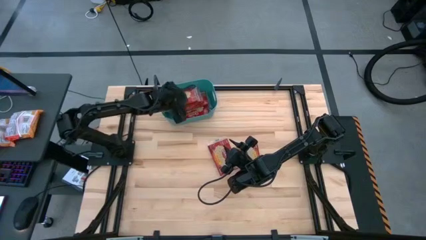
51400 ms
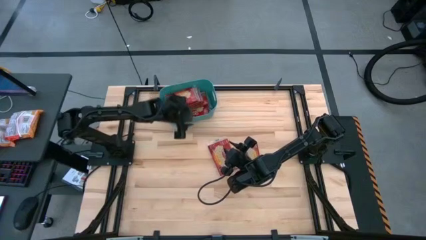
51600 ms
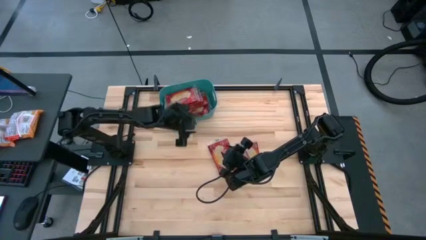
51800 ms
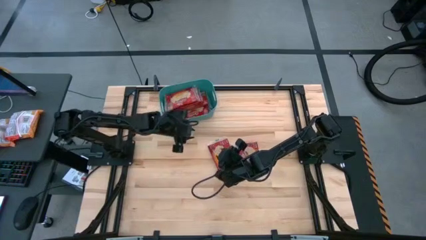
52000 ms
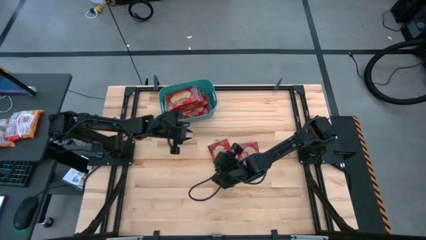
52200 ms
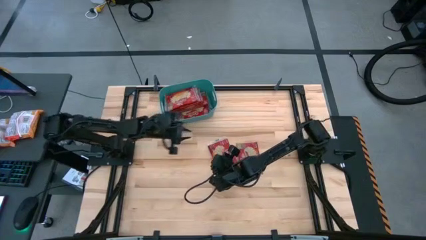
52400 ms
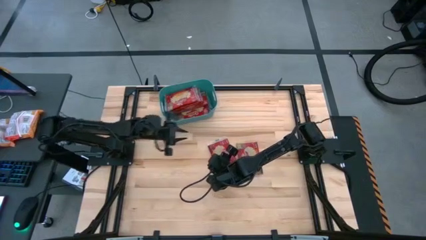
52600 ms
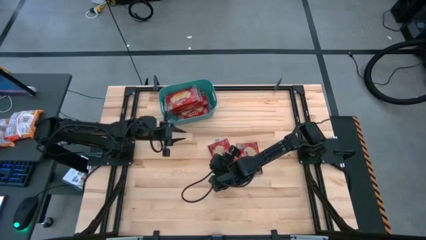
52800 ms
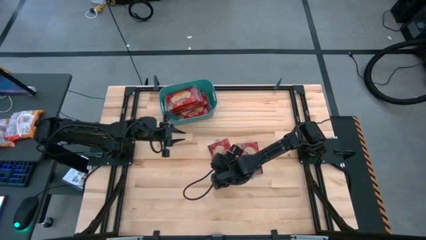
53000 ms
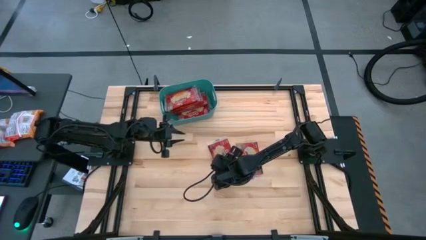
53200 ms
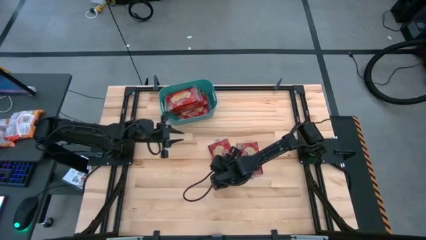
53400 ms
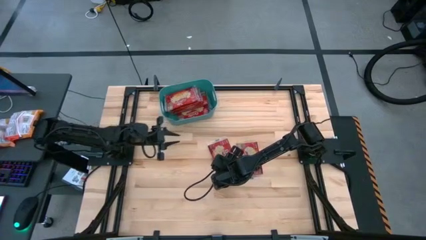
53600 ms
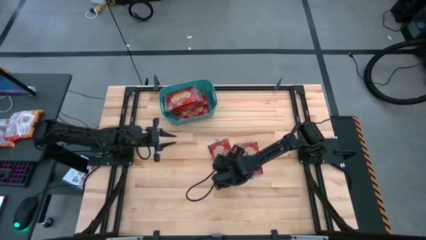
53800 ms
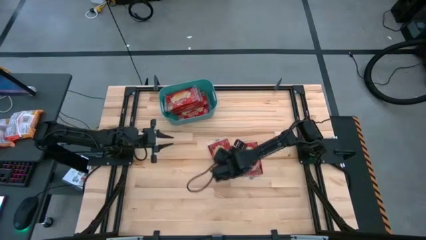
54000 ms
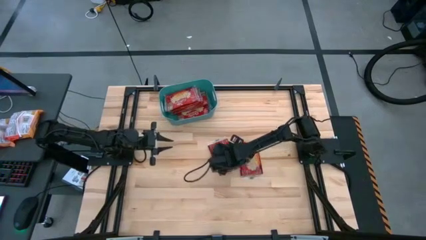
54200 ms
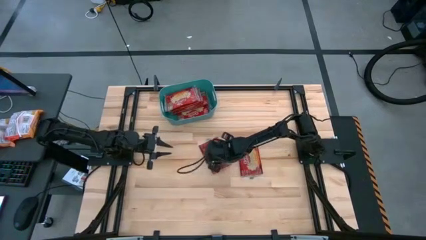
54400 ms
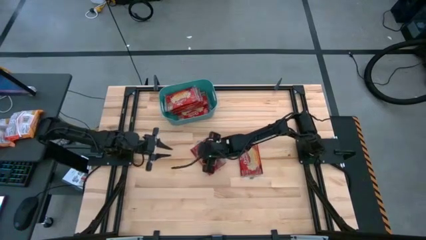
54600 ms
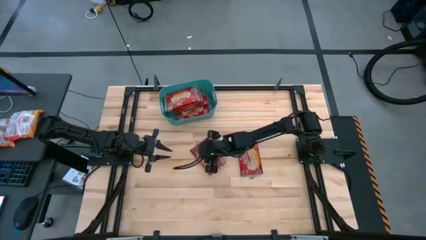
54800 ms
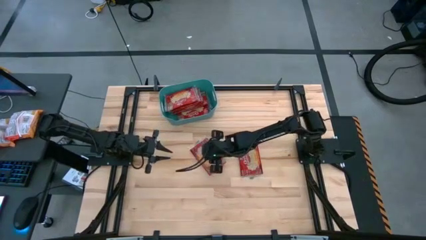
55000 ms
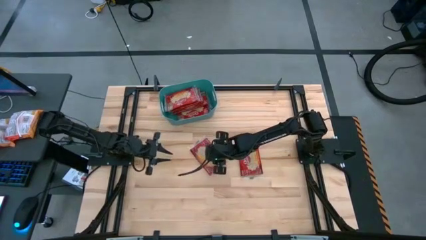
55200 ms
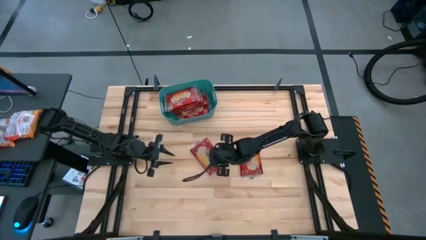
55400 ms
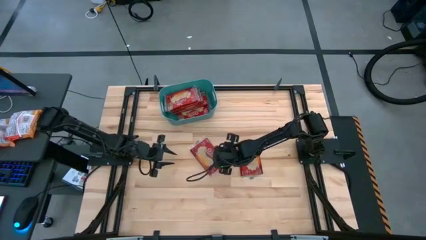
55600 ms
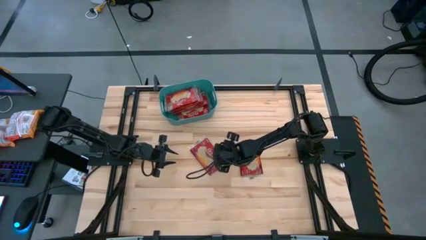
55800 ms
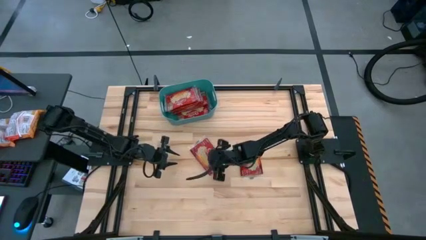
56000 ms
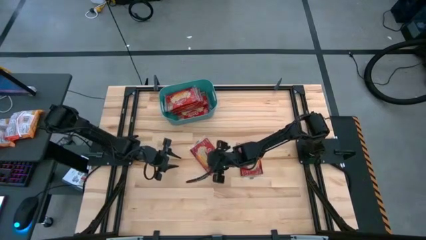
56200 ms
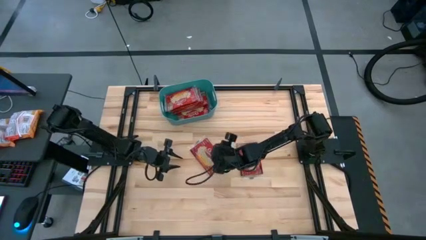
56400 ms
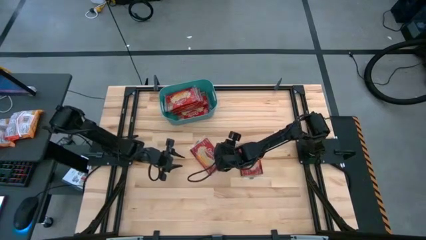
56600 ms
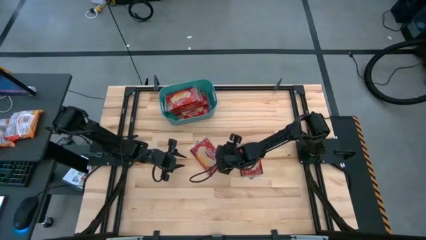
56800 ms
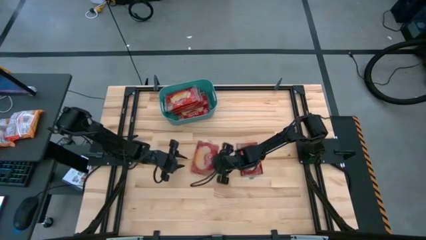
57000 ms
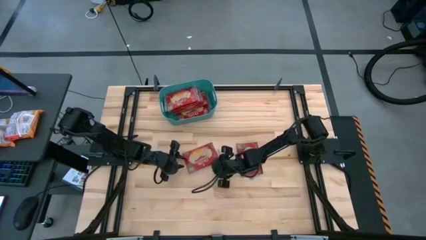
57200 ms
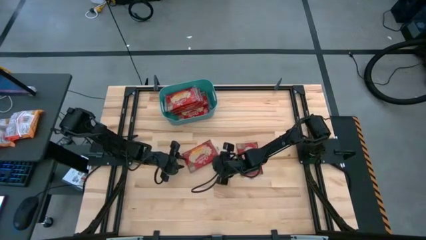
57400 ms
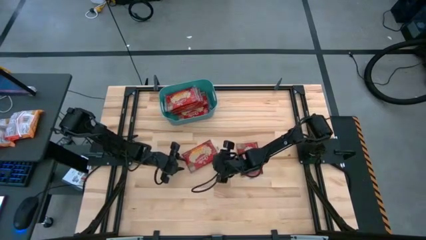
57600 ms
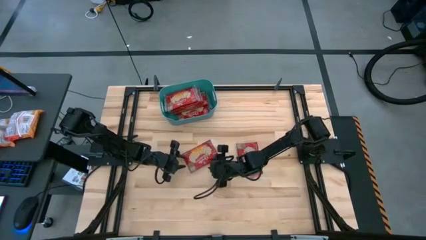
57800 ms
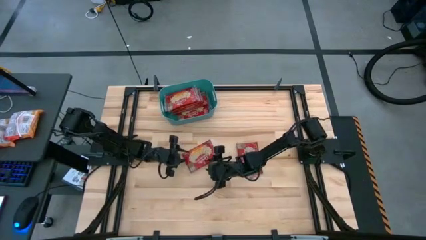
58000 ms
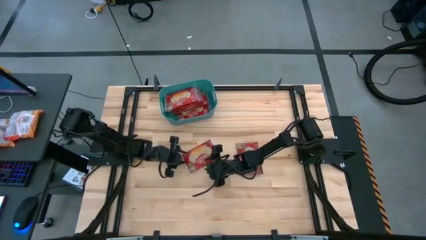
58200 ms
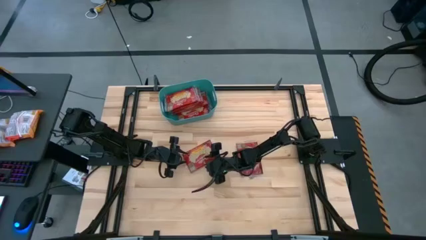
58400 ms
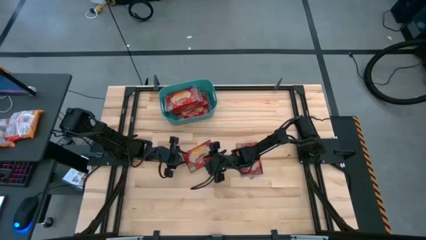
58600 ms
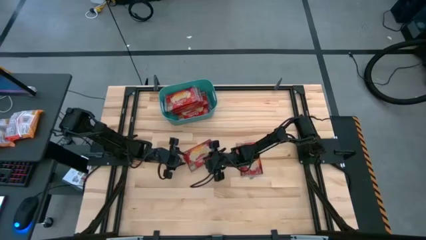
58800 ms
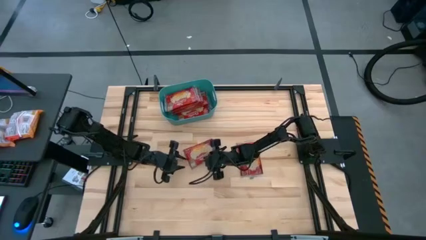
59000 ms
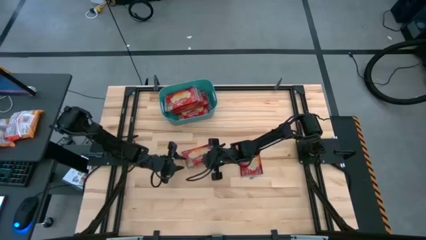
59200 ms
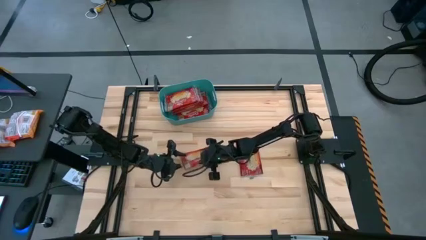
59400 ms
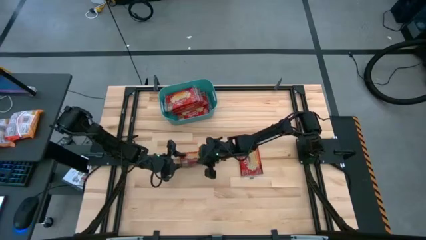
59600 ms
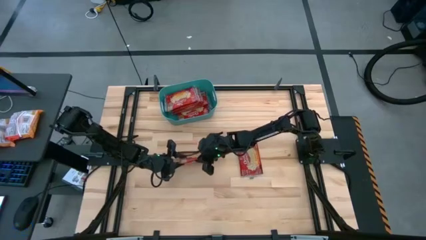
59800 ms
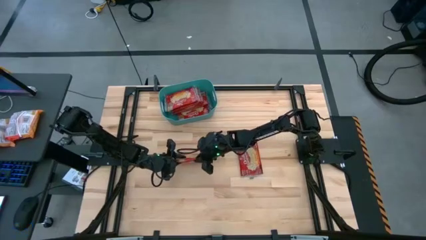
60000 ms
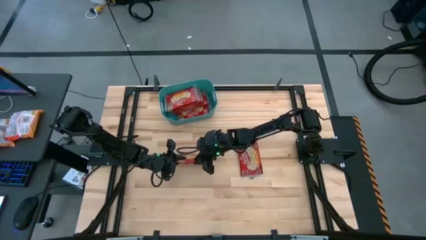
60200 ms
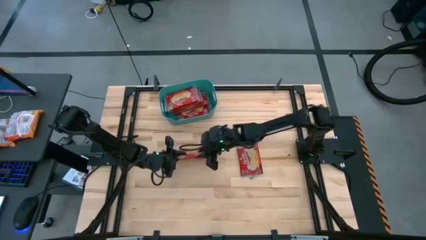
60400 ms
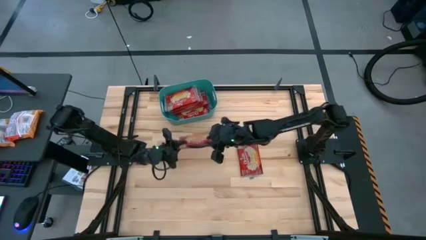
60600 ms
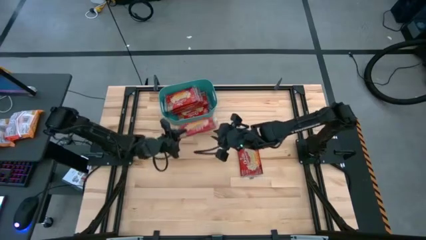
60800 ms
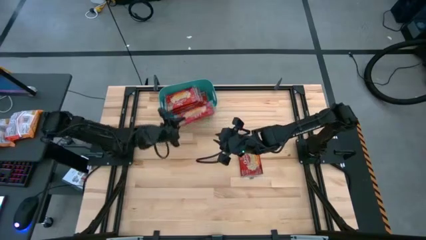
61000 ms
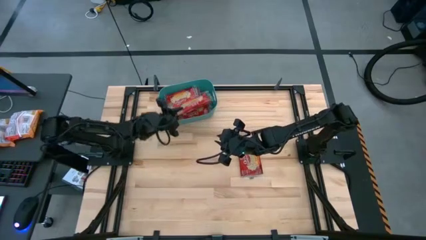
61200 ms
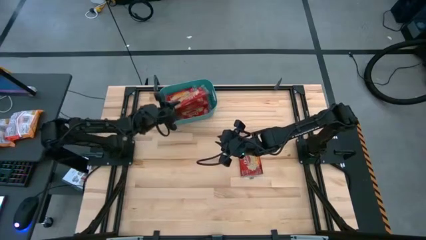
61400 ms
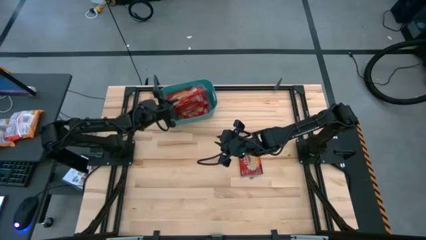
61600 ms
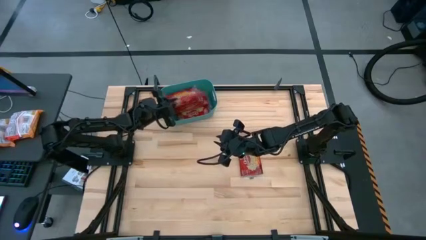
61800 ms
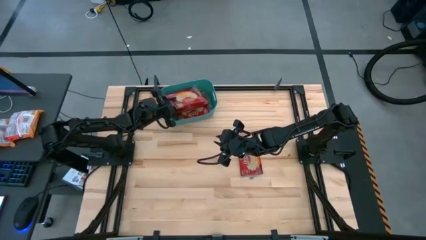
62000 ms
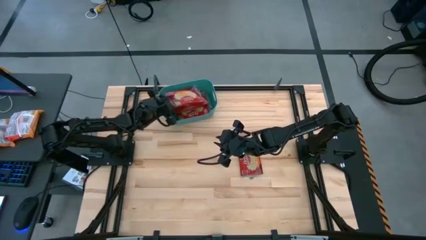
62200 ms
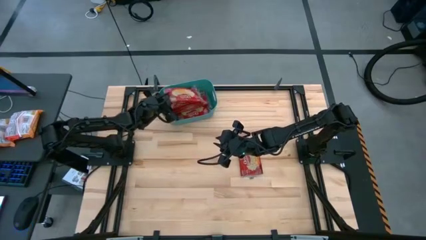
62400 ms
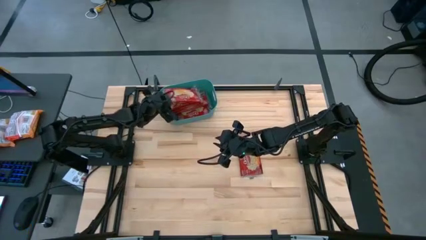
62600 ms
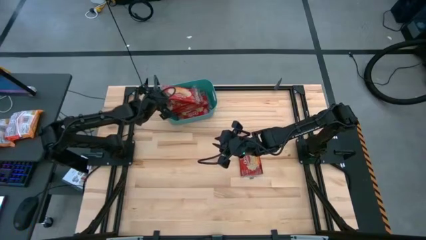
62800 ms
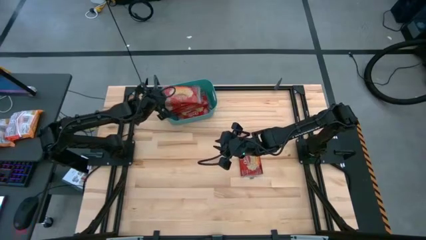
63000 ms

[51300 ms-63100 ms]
Task: Sort popcorn bags into baskets
Put the red popcorn bag into the blue container

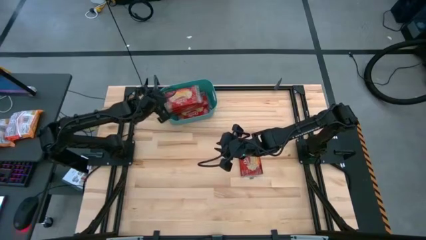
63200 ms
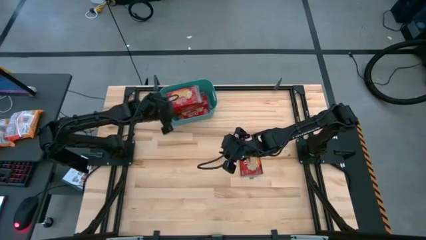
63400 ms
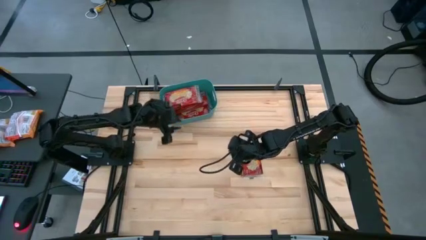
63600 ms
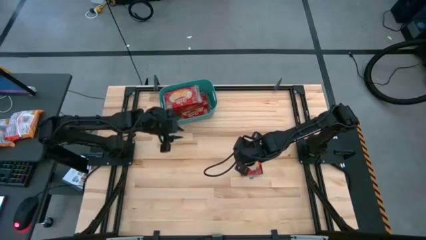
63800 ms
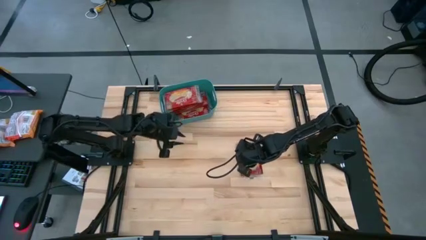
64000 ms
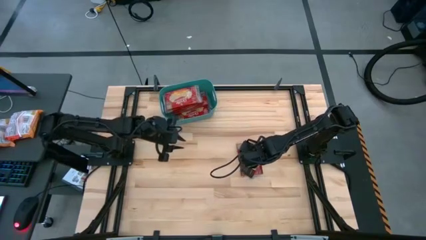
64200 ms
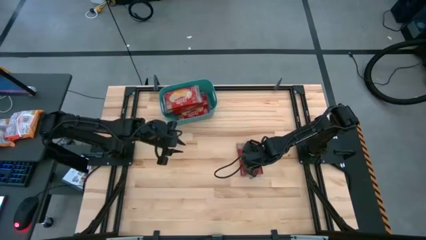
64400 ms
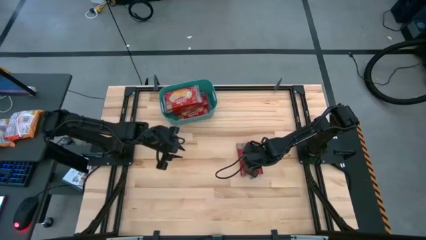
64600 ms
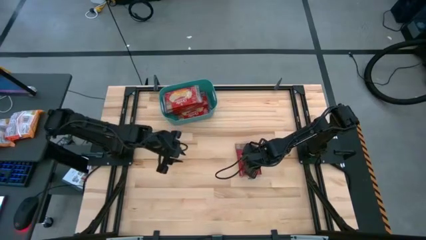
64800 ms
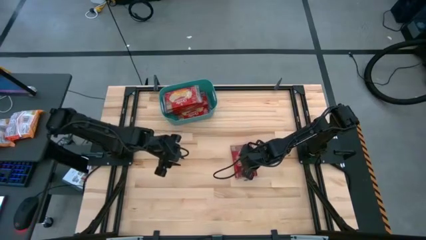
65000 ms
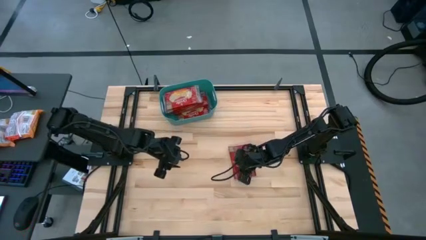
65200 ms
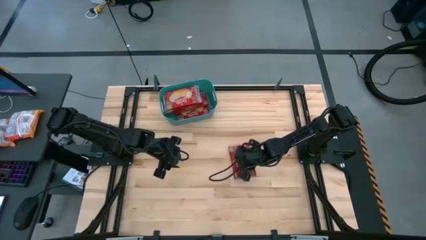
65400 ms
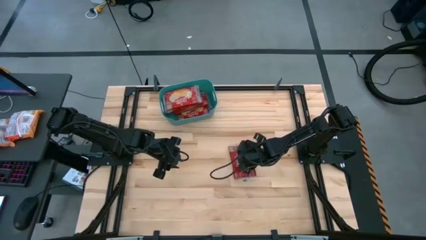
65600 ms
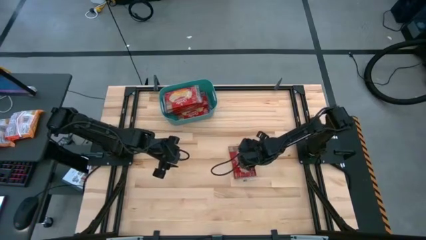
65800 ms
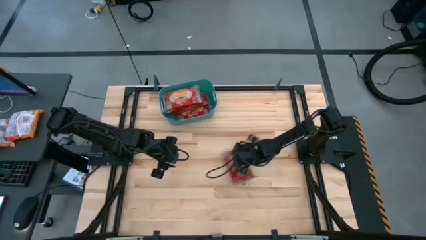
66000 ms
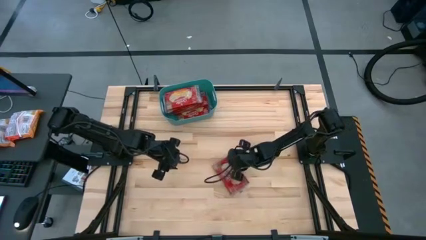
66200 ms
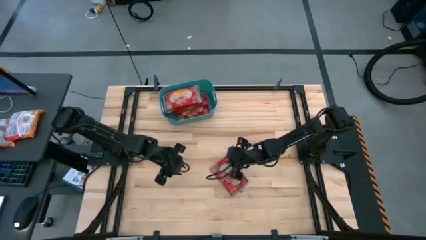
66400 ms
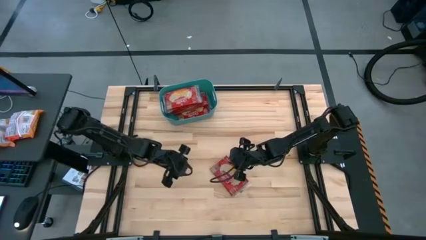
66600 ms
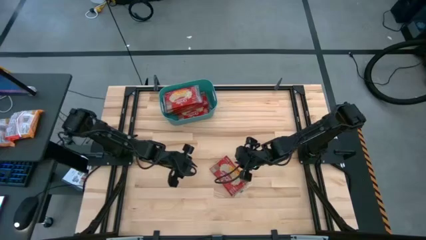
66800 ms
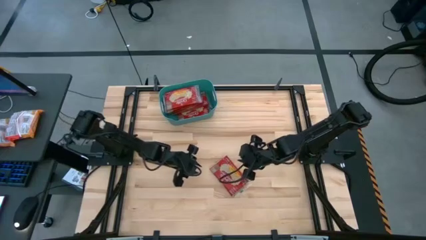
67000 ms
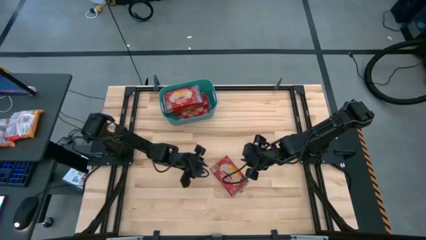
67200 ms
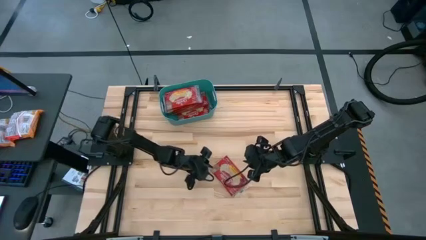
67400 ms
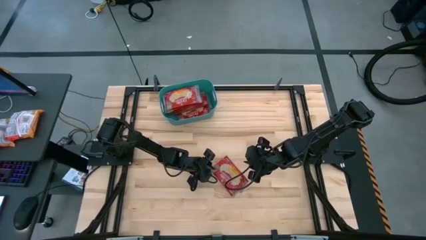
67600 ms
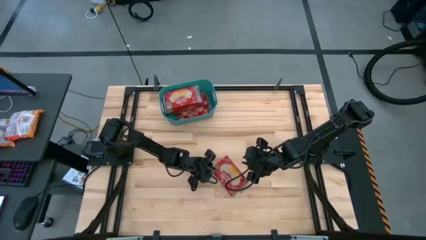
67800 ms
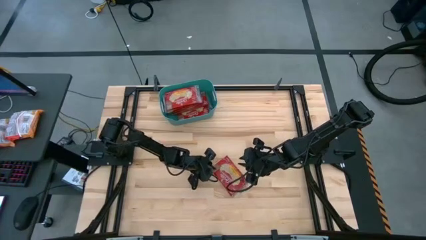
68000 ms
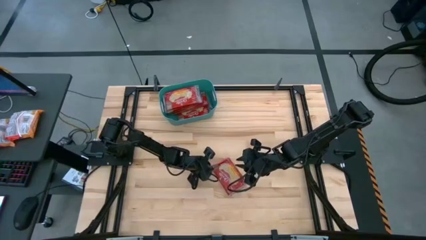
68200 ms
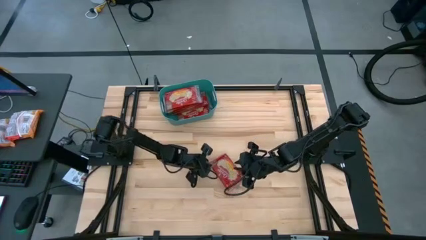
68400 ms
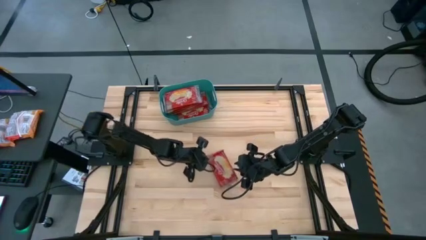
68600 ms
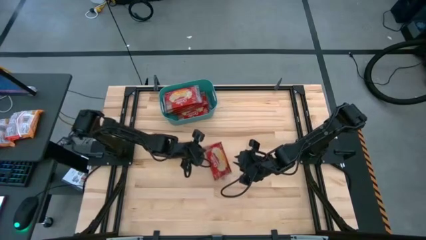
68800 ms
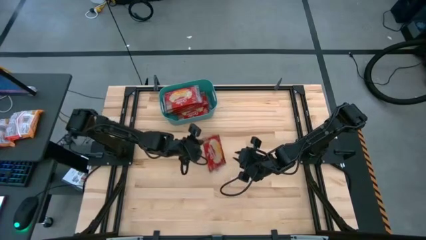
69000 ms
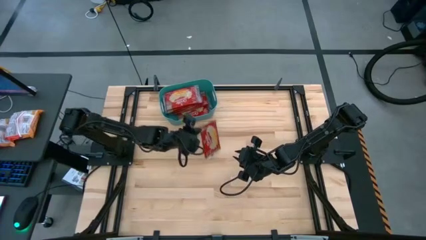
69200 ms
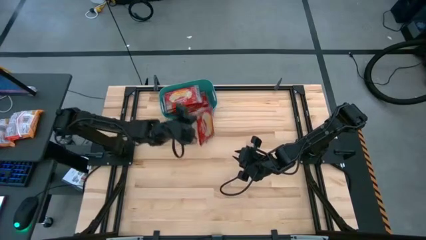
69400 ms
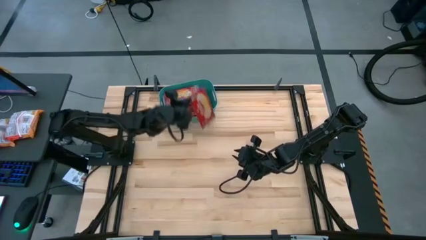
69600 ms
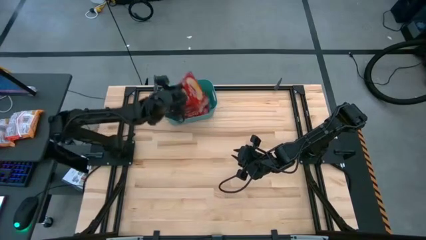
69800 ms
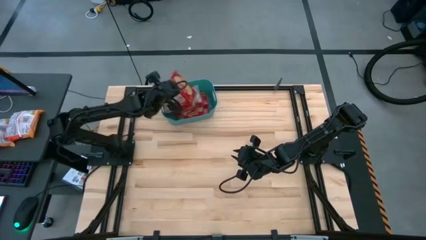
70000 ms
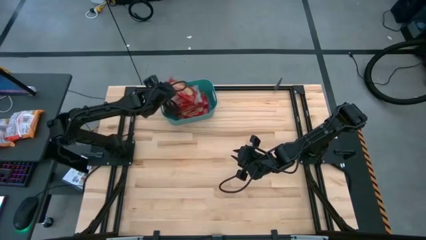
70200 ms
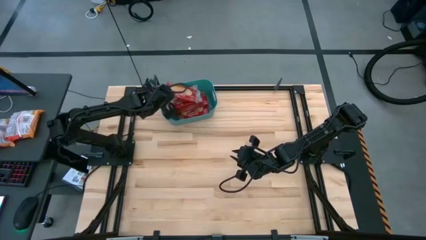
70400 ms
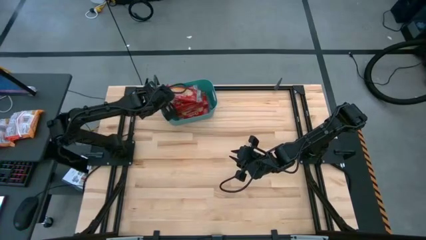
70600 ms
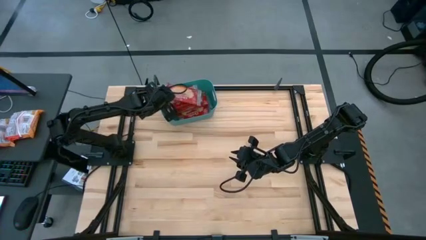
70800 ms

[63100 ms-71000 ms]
Put the red popcorn bag into the blue container
